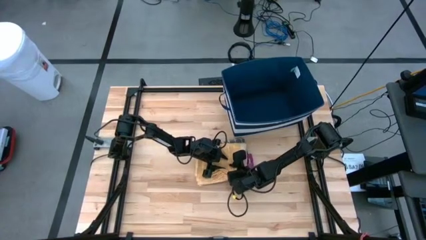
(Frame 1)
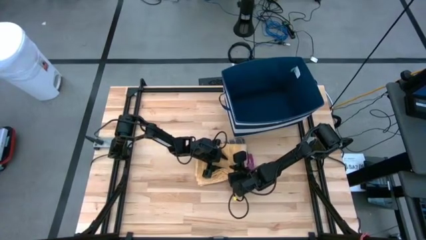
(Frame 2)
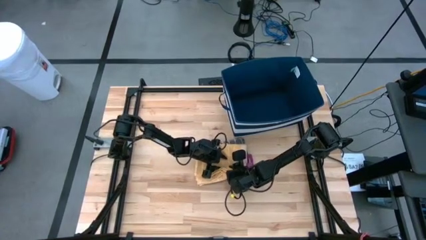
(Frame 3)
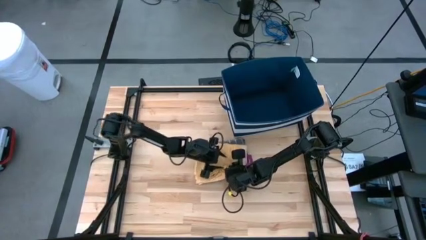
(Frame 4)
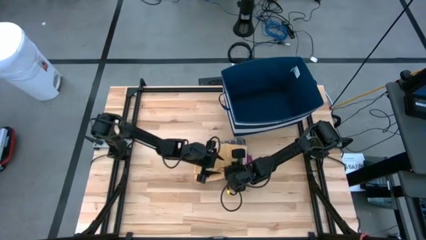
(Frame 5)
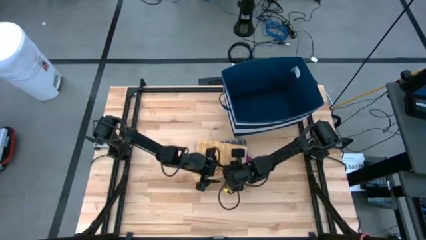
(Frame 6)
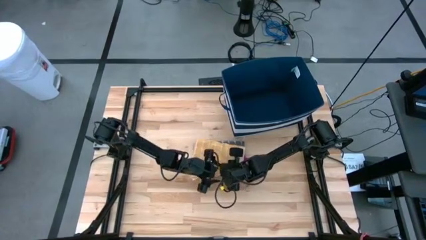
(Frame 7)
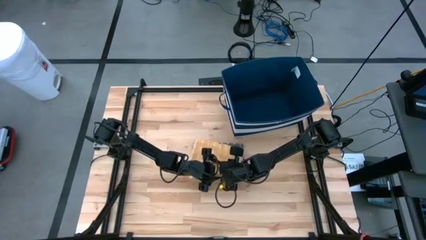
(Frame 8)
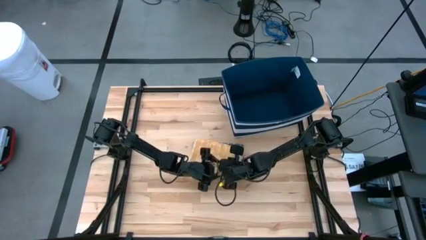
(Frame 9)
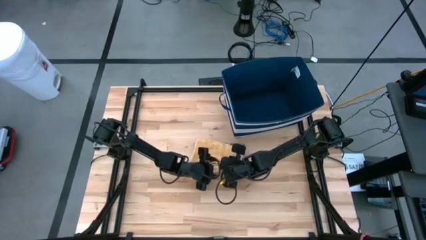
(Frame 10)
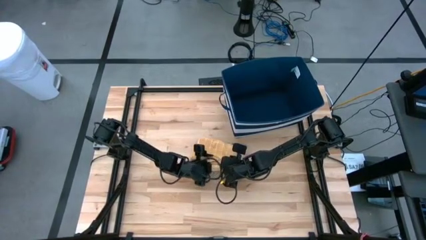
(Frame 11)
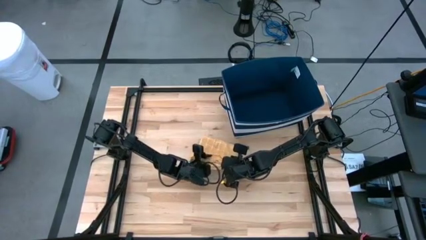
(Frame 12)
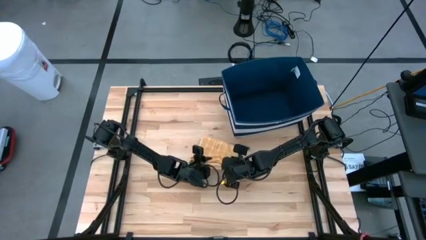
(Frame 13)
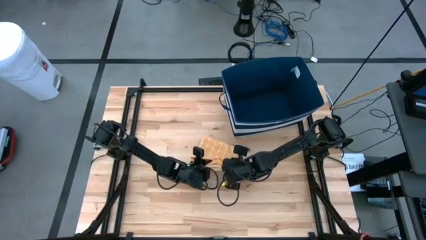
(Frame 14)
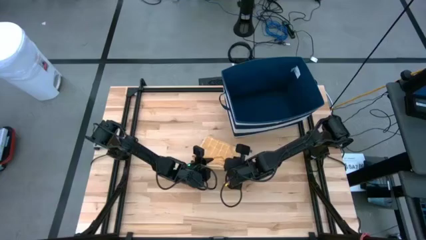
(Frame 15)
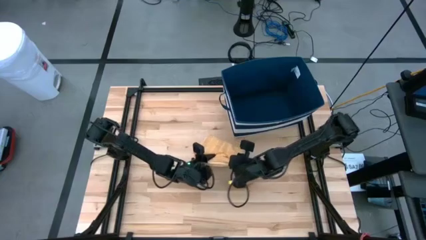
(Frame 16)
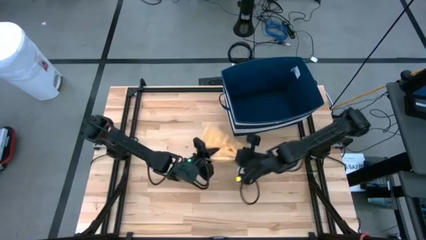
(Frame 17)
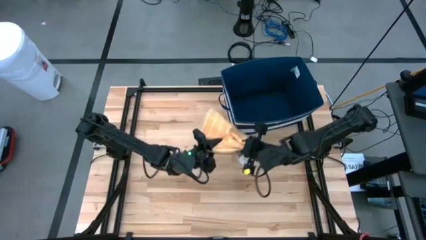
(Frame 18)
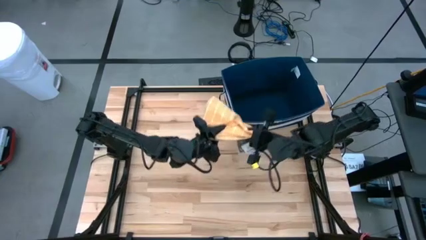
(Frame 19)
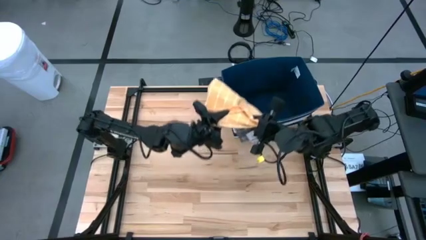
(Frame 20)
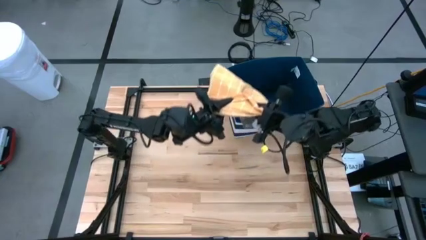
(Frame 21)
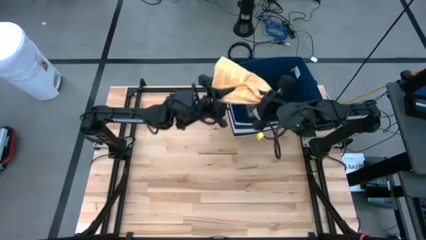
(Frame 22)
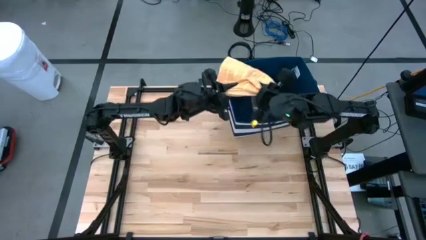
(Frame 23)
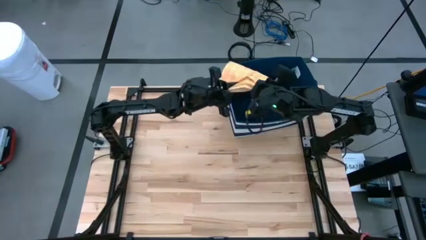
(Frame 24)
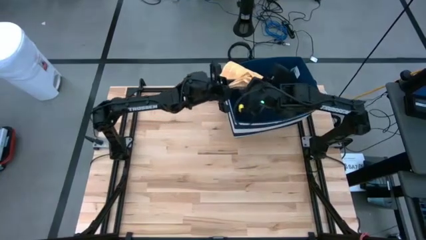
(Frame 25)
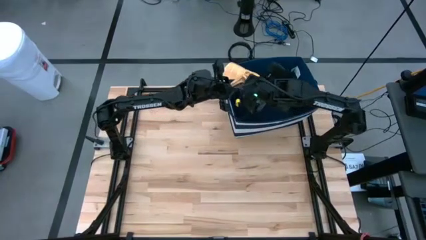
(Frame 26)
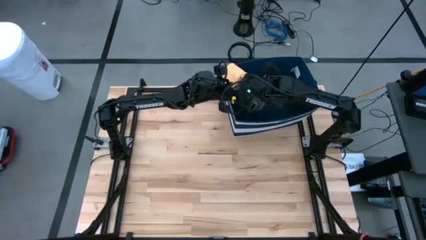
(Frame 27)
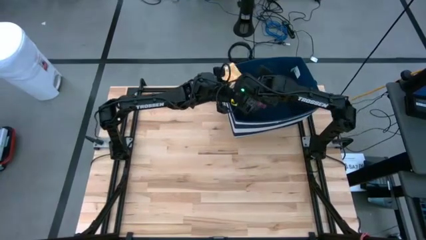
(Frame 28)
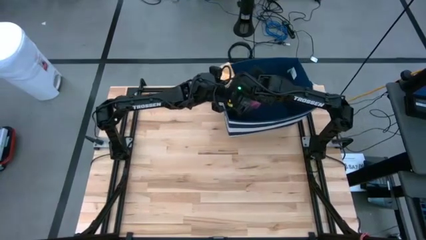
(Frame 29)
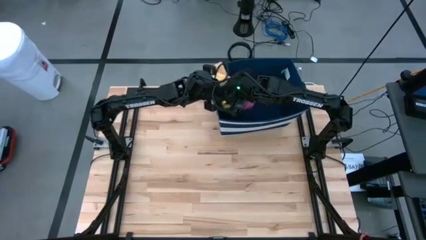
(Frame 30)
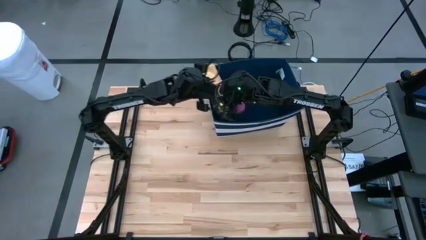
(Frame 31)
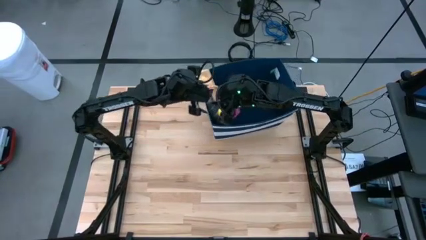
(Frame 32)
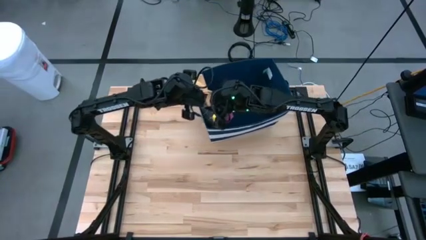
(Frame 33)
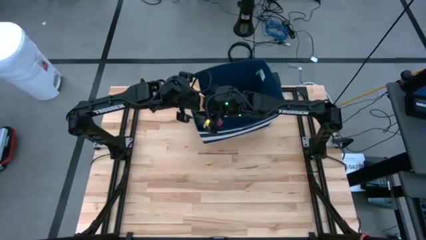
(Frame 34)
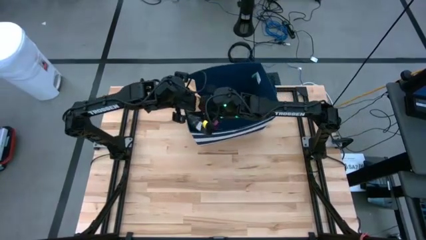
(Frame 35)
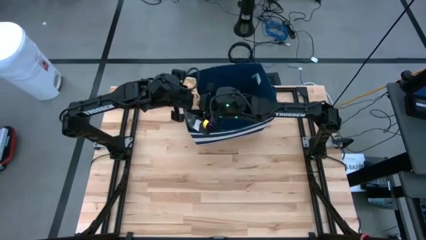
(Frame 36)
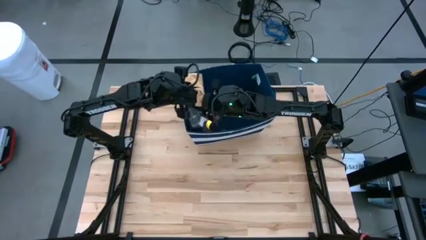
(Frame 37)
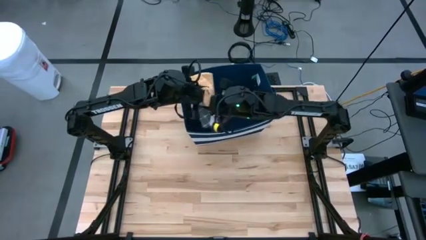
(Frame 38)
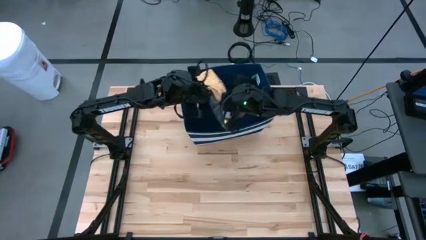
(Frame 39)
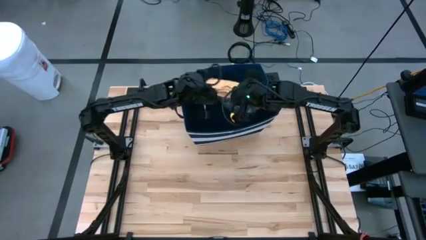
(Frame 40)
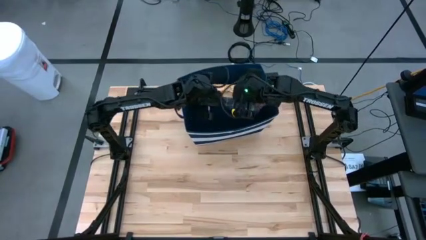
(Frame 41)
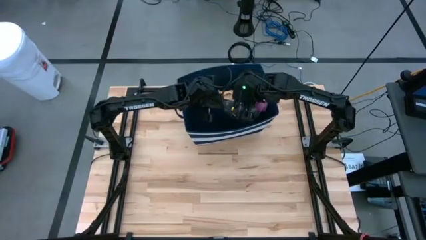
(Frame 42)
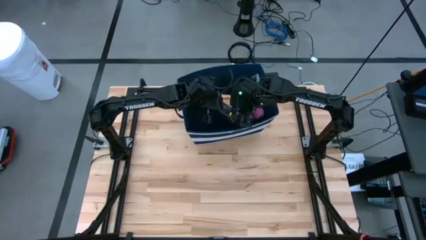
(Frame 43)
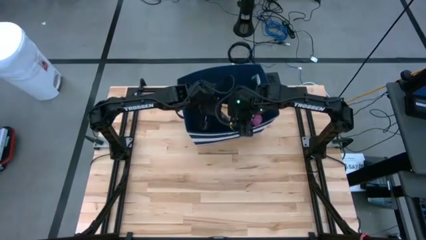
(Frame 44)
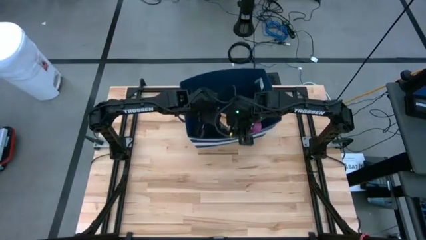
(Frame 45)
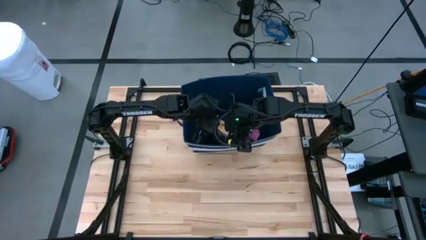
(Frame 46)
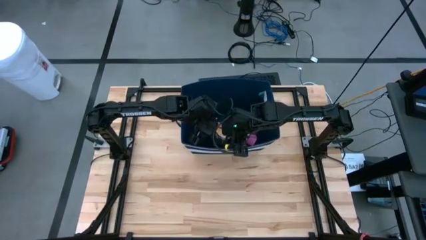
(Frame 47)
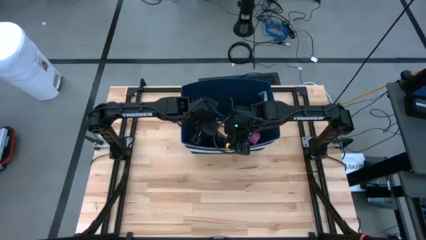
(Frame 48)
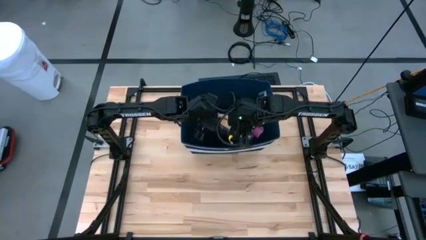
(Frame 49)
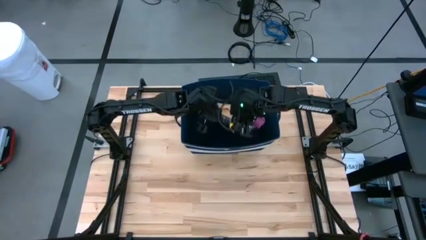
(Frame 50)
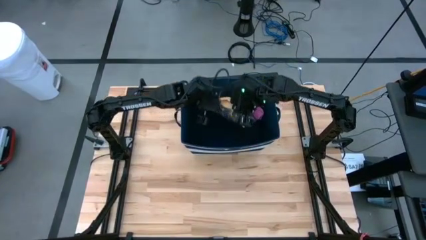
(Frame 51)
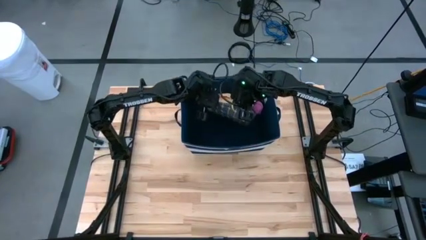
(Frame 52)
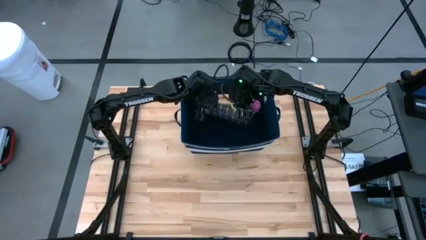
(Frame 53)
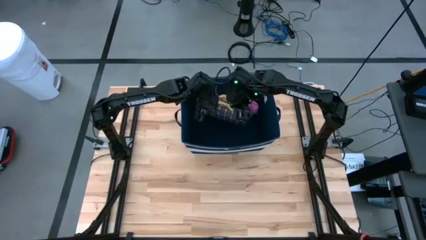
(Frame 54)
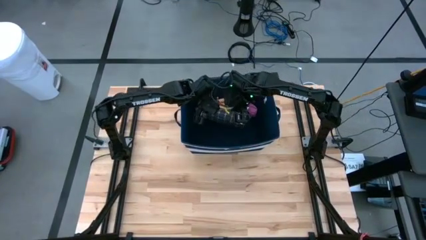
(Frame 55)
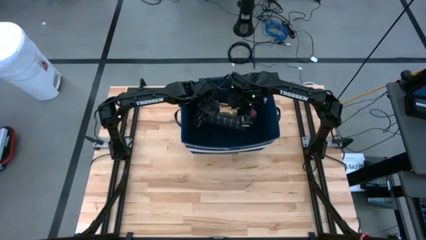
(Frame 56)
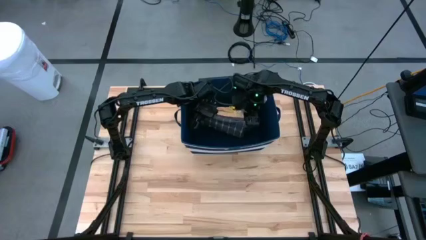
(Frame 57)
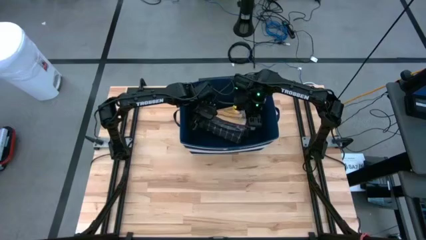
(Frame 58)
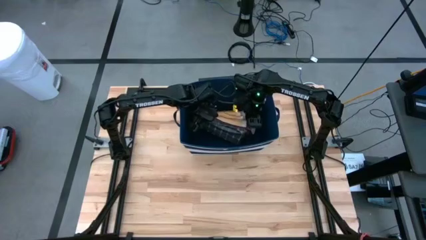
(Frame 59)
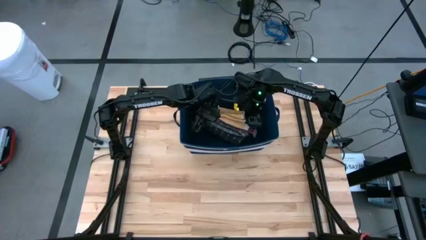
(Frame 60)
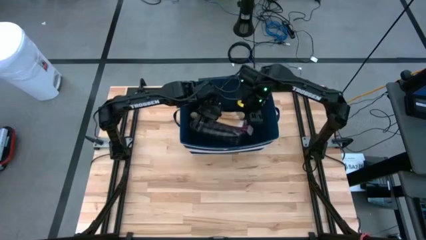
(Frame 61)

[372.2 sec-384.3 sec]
Task: Fold towel
Put the folded stacked towels into the blue laundry bin

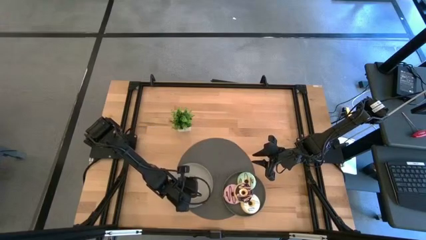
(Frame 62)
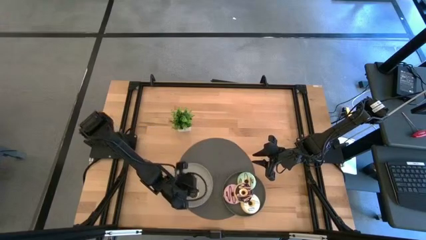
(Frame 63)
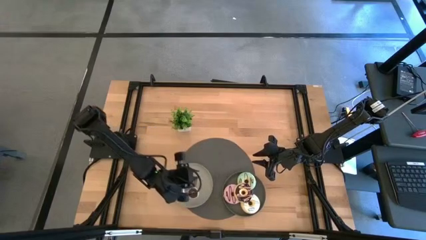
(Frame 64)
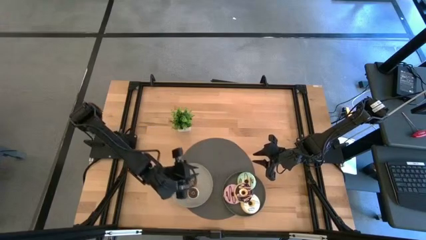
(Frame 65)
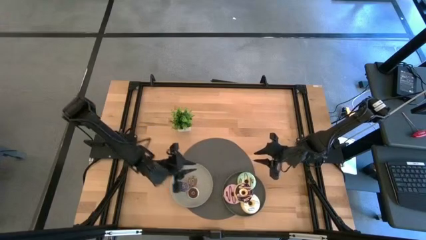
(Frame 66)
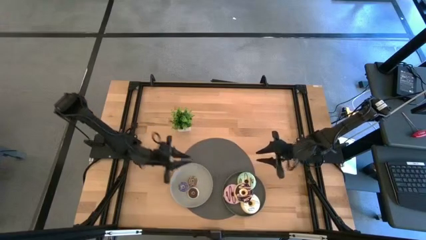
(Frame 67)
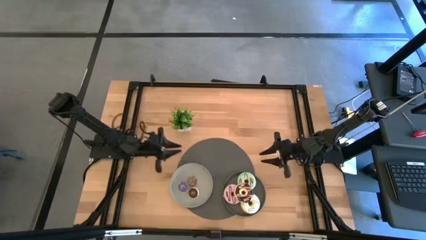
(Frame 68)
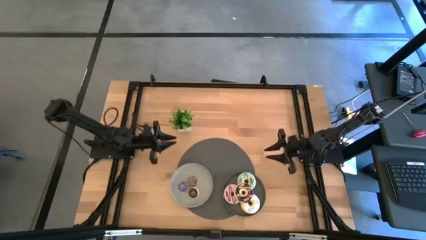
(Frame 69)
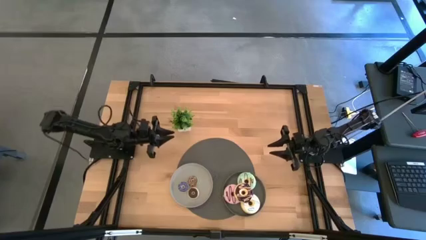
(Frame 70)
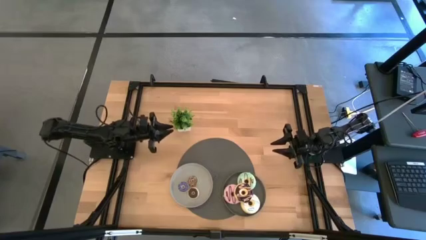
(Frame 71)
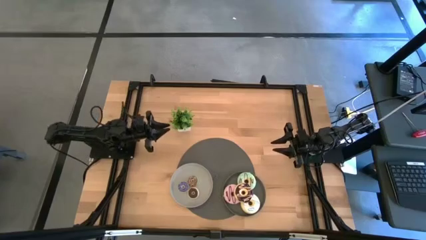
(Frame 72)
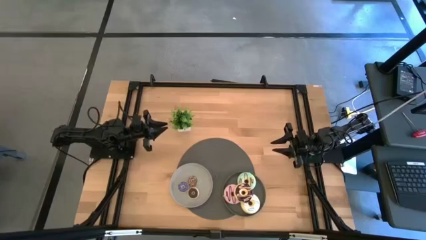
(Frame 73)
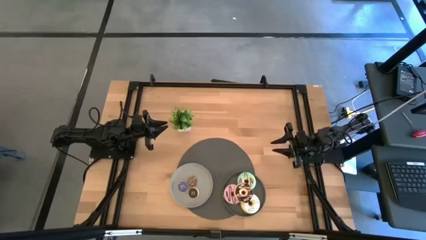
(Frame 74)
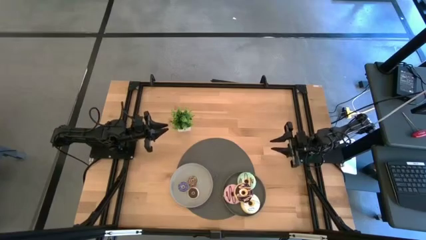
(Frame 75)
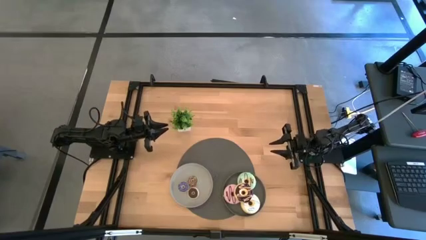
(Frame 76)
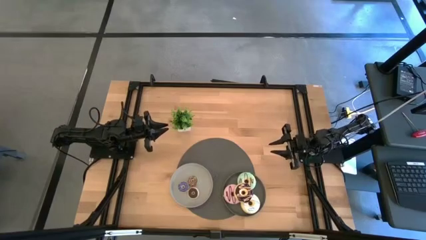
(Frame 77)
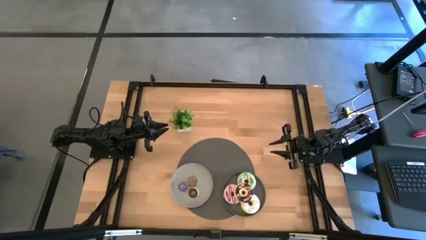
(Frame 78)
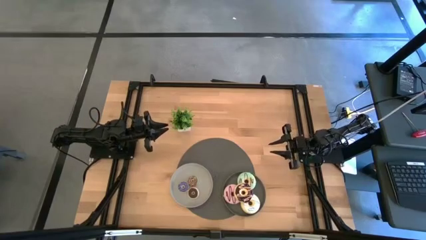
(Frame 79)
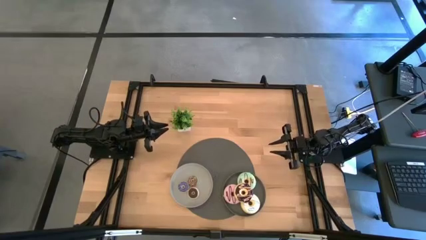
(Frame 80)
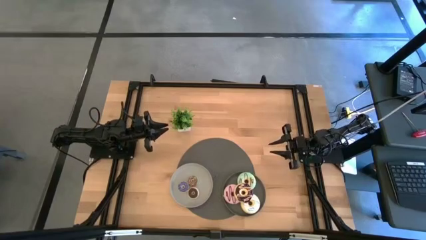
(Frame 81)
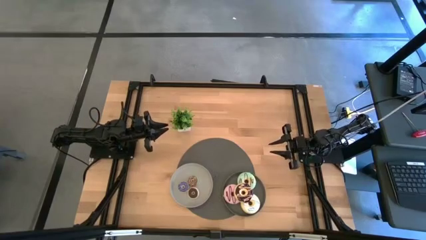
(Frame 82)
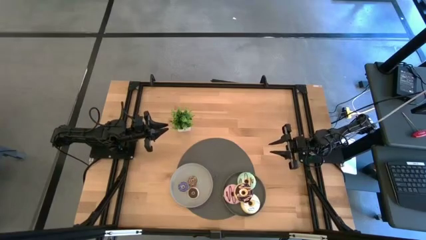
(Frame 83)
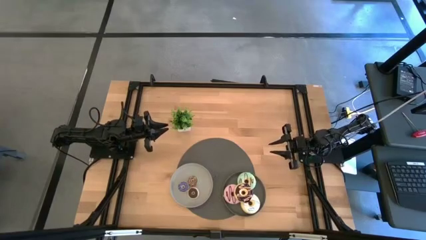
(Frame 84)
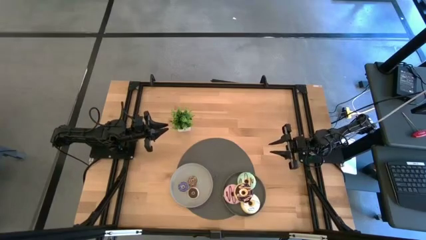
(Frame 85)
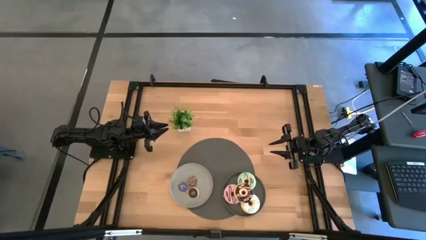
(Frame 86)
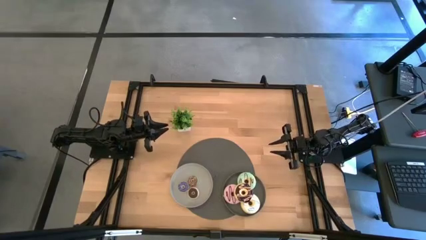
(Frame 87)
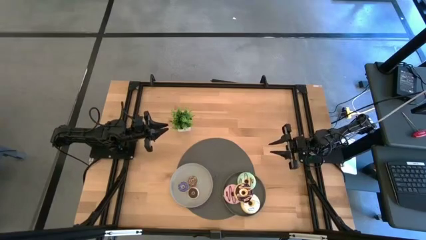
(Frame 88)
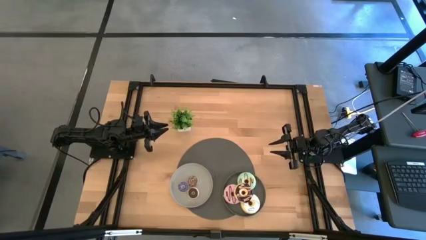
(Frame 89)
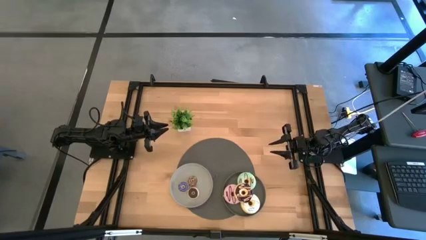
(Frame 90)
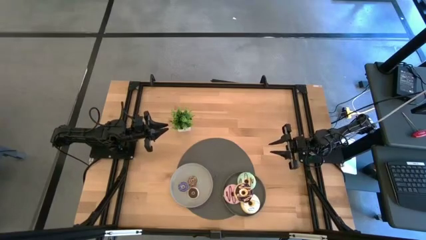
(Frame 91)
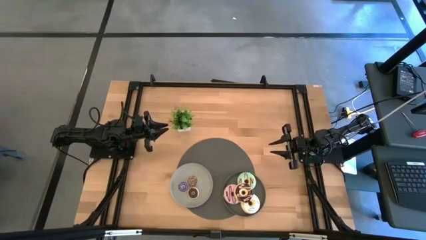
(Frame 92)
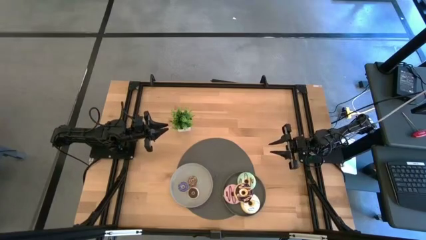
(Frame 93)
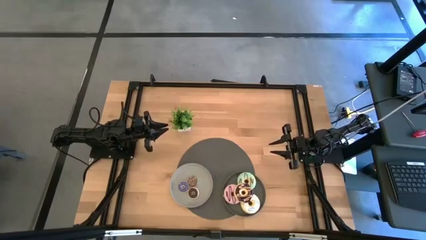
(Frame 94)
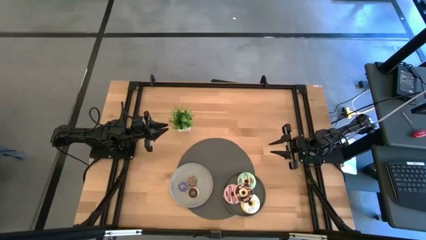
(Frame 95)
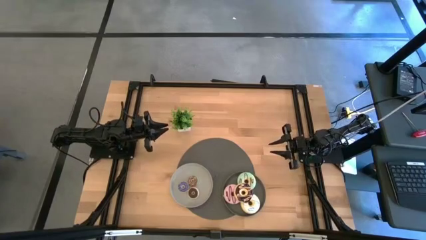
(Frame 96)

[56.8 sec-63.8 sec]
Task: Pick & Place donuts
Return to Home Position
